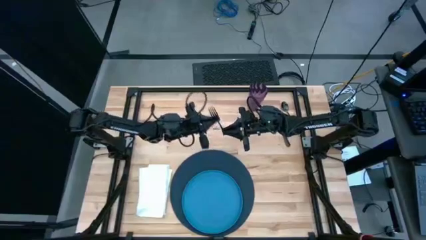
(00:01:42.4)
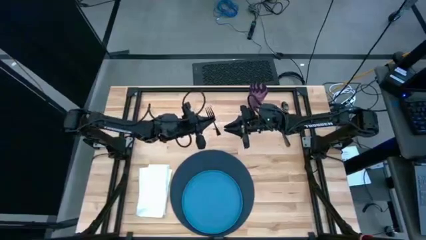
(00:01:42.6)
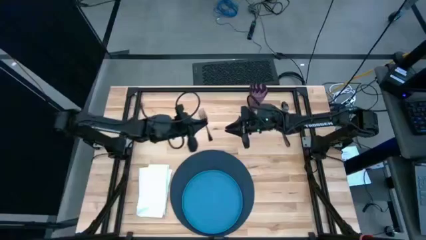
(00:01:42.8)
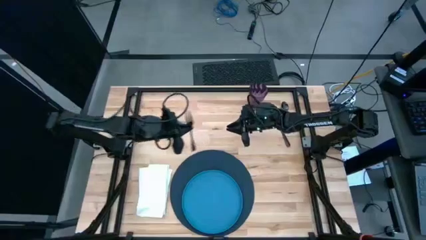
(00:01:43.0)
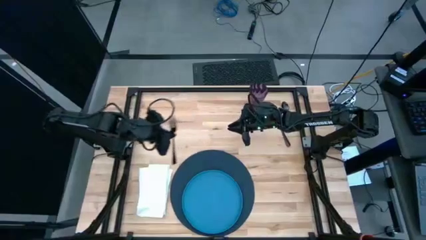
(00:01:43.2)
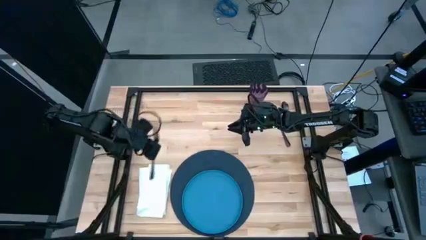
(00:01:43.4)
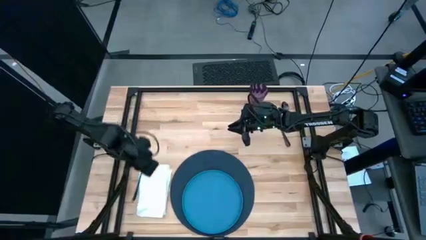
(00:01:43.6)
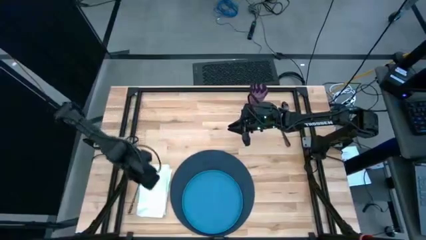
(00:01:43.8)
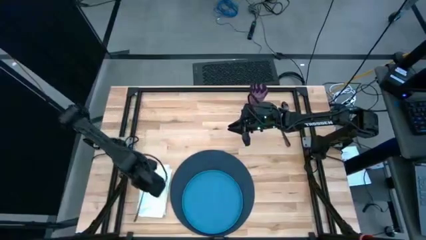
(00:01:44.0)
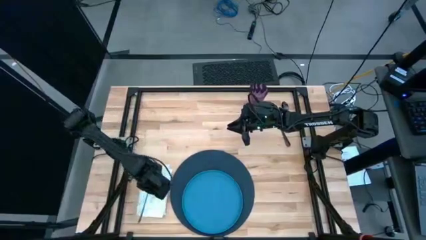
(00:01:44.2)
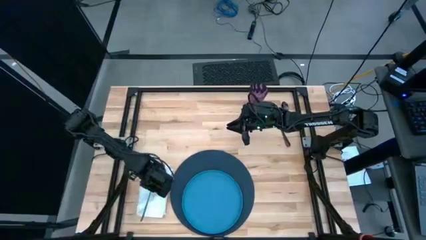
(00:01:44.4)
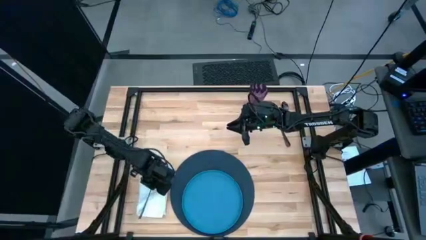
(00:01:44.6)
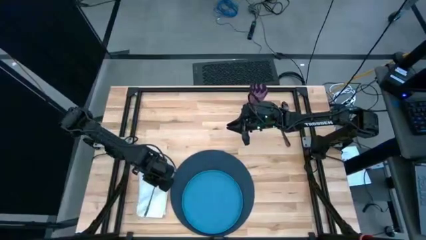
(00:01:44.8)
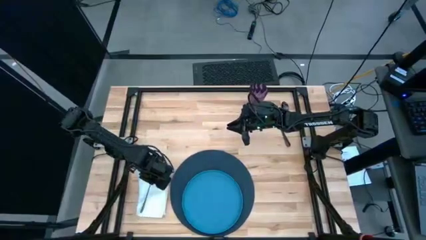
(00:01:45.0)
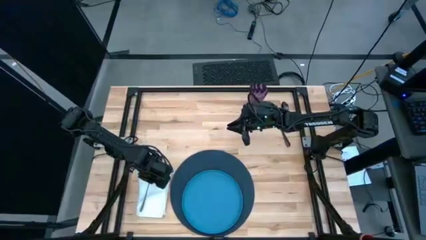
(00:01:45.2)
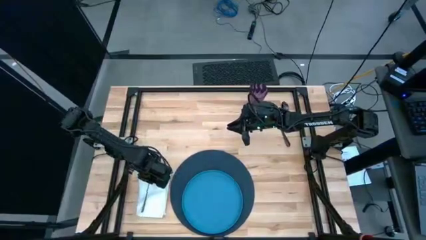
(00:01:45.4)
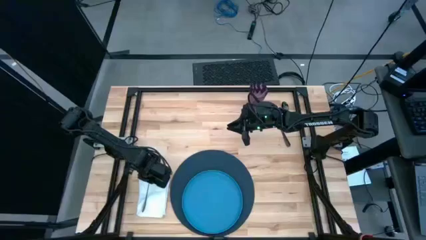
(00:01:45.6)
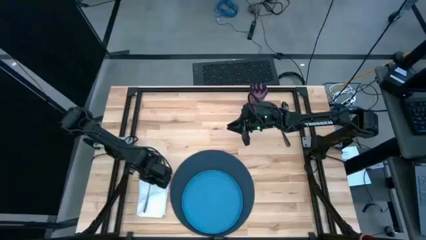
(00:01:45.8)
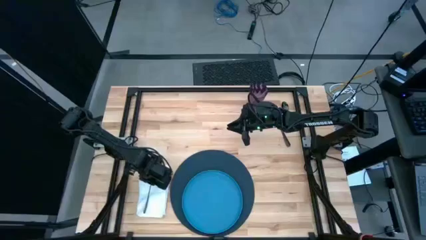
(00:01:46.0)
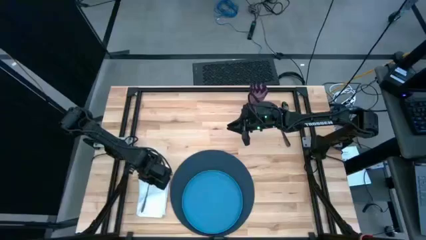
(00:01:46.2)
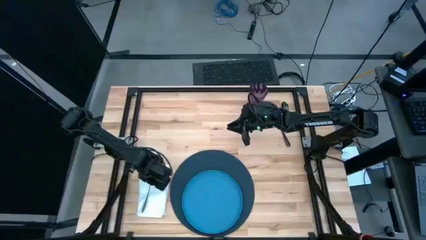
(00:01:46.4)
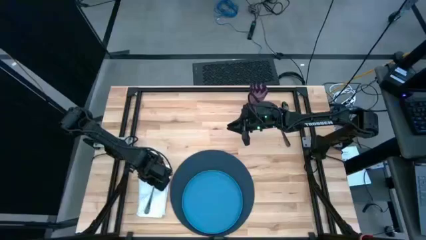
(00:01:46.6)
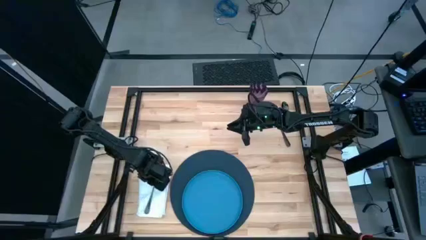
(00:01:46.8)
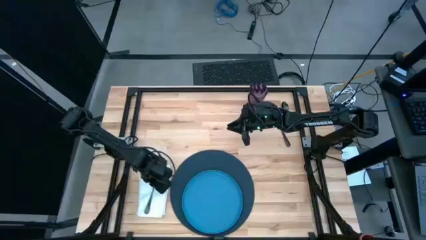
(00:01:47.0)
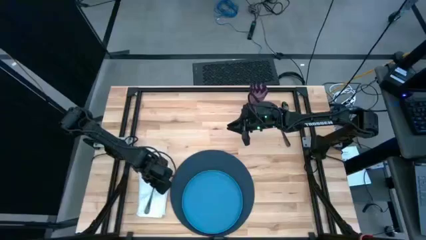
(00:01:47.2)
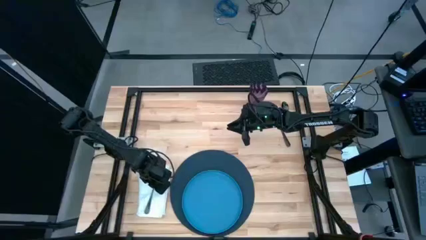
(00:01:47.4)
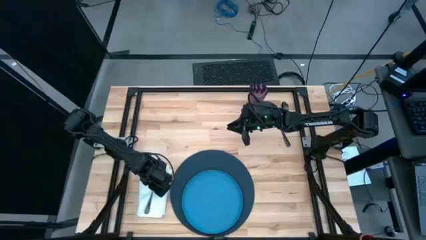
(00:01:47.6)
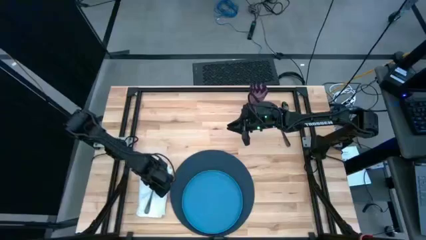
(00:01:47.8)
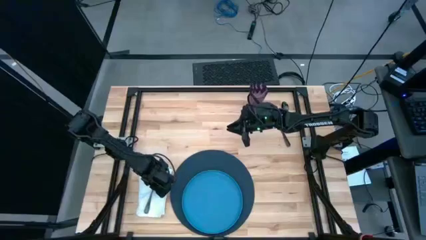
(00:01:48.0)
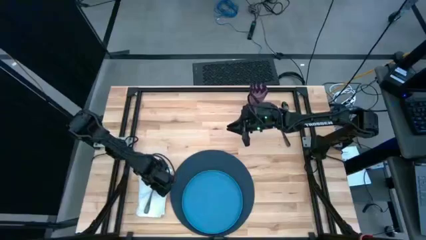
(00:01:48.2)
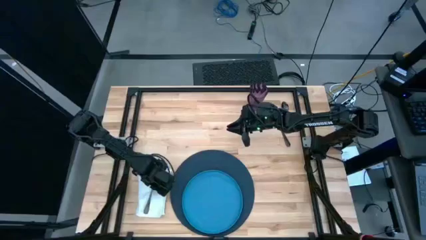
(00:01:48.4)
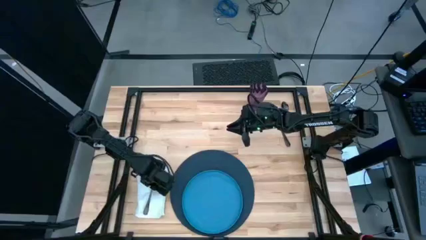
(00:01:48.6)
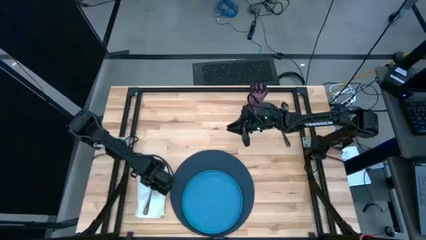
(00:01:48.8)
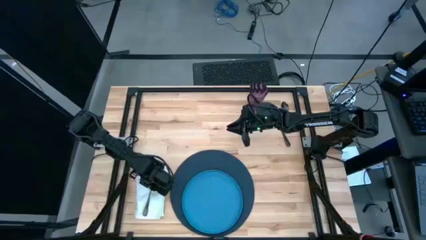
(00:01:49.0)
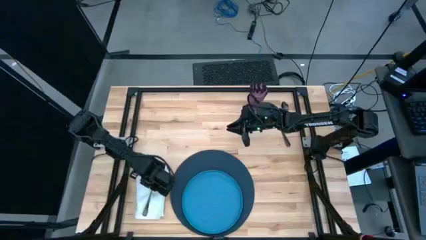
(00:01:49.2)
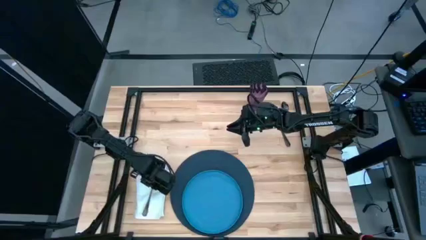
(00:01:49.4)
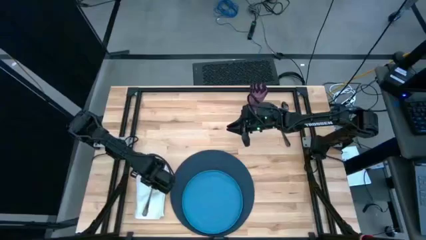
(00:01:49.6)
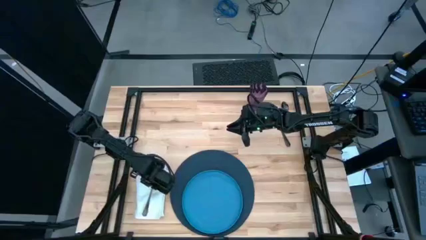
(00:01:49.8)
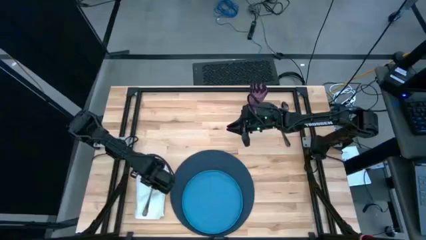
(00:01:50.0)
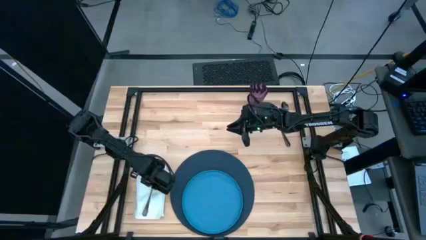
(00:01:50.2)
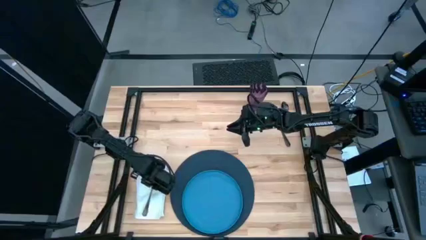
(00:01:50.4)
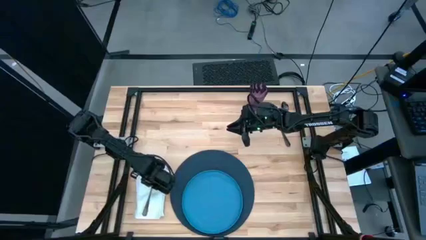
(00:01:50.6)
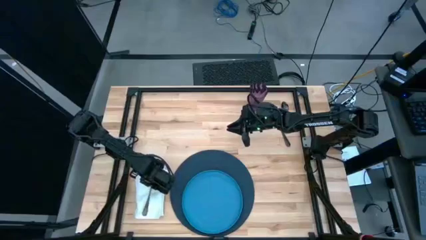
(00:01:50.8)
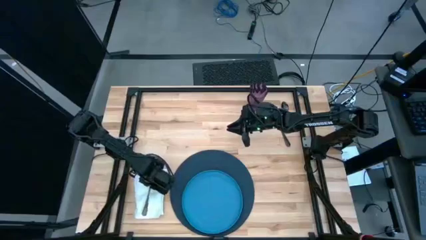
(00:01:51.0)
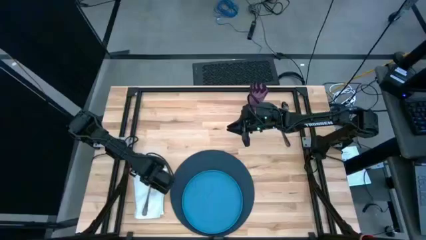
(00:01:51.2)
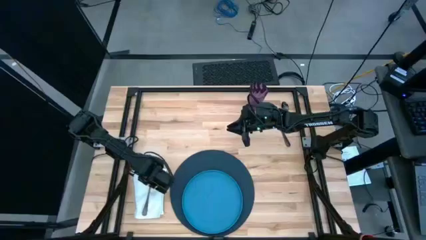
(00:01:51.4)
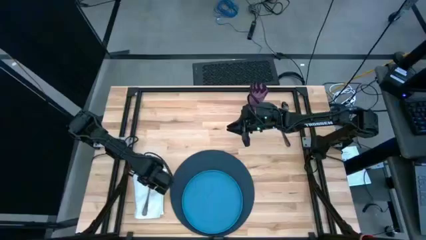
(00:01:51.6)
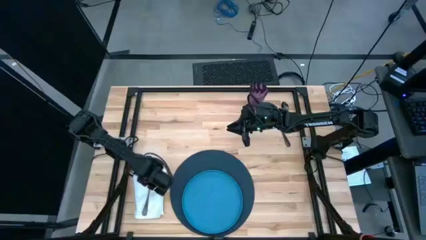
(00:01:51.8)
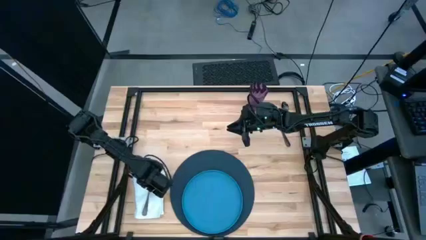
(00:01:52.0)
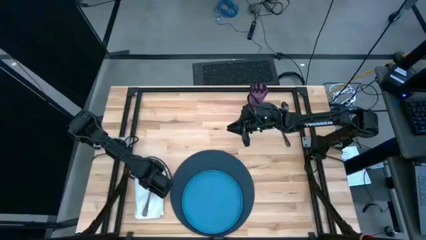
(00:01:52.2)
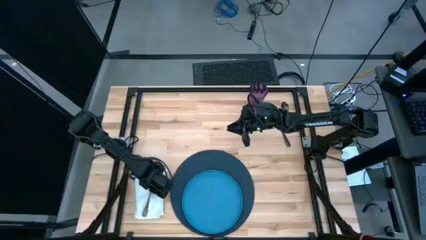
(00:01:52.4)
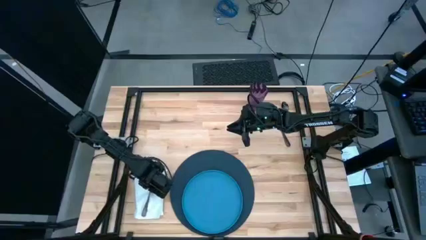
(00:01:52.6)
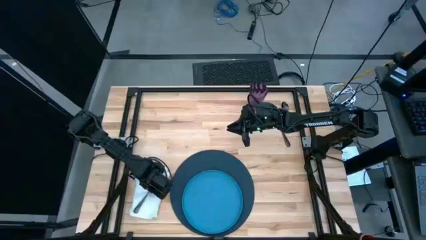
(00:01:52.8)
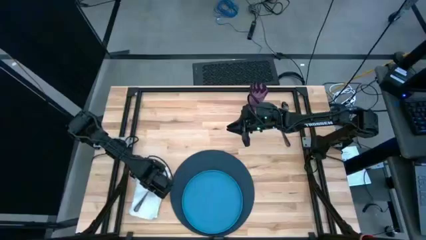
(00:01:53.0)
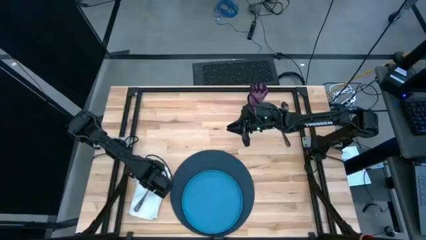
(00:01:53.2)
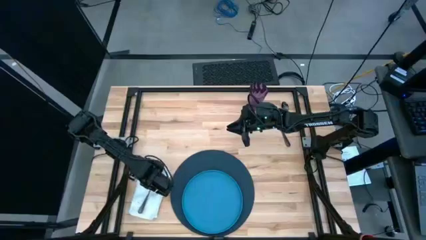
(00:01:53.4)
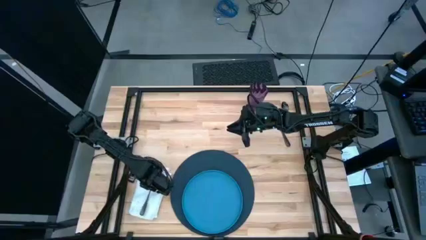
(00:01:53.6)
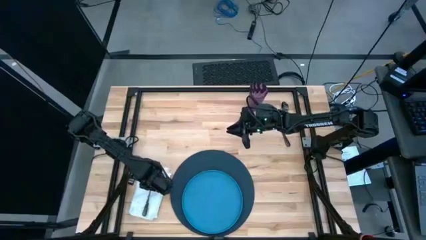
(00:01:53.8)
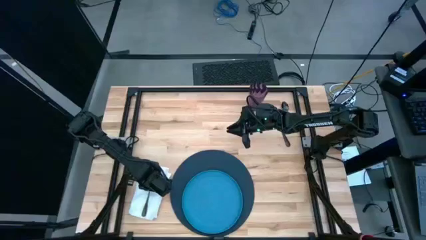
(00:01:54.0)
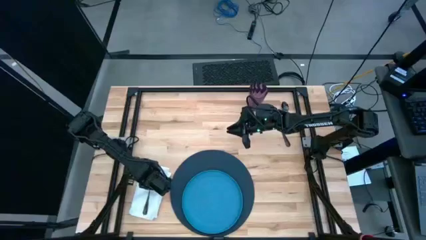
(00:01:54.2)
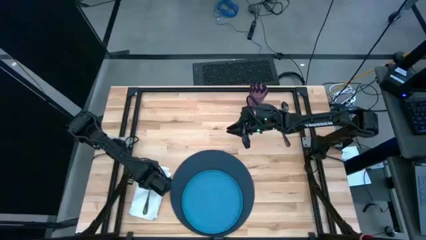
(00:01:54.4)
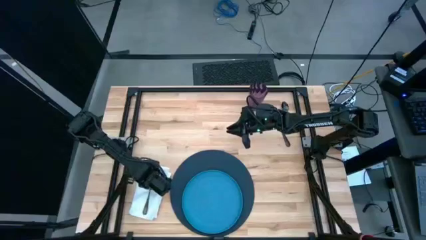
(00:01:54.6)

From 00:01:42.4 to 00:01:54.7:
Task: Set table place
Put the fork on the table napkin
